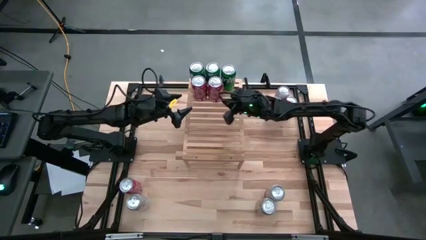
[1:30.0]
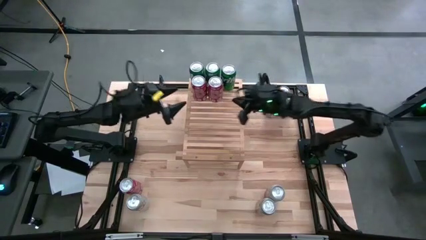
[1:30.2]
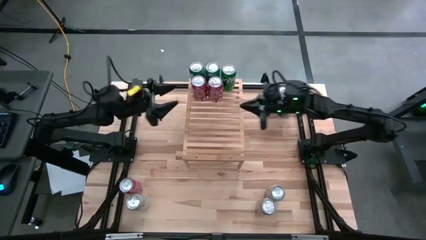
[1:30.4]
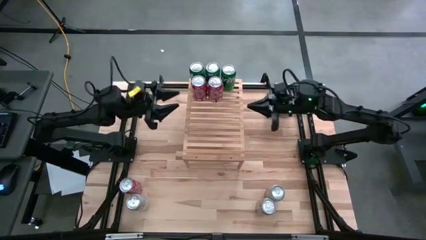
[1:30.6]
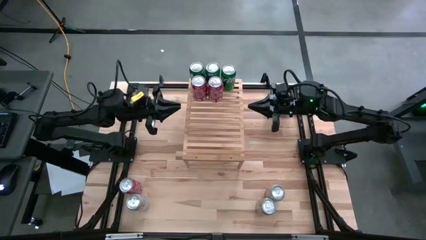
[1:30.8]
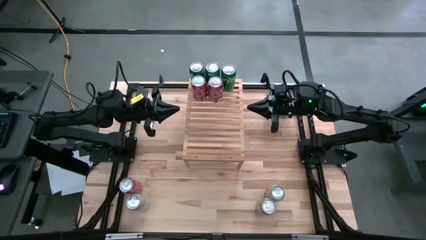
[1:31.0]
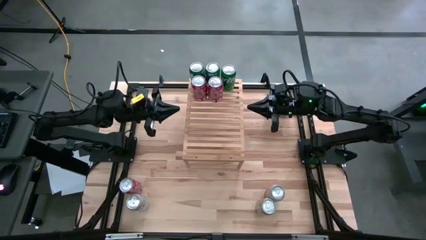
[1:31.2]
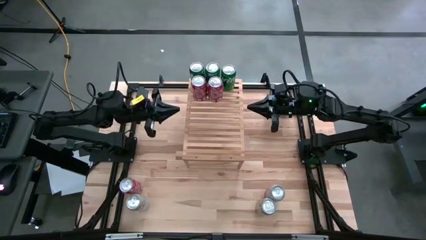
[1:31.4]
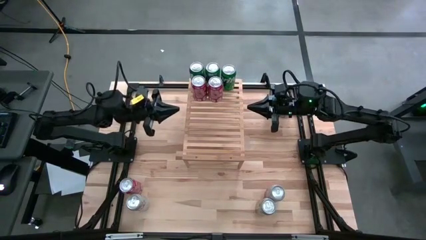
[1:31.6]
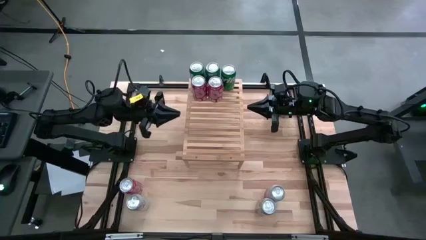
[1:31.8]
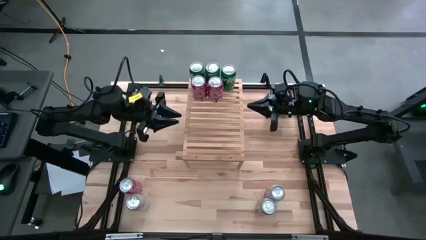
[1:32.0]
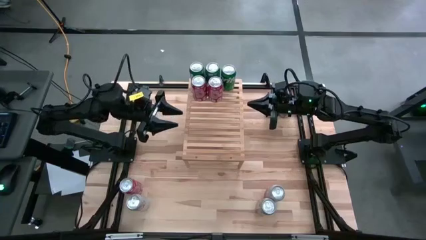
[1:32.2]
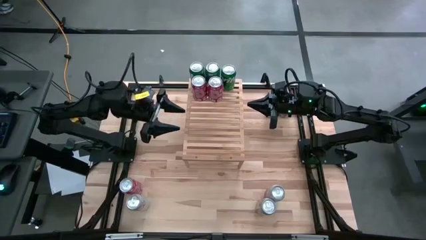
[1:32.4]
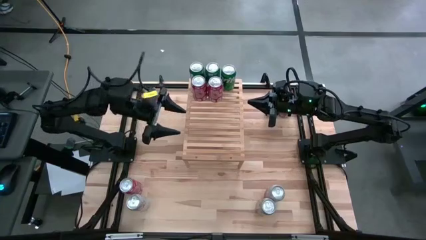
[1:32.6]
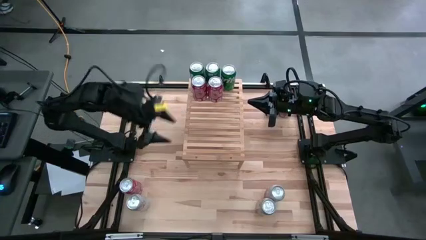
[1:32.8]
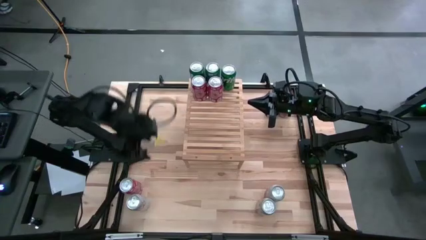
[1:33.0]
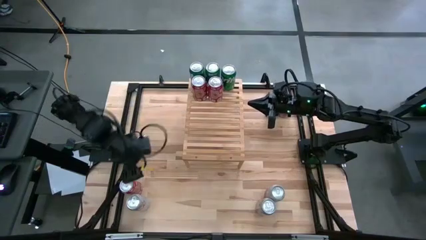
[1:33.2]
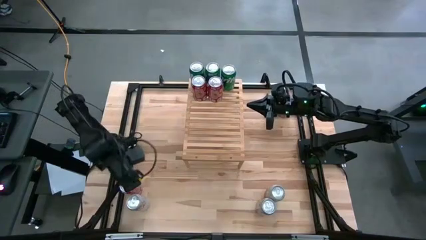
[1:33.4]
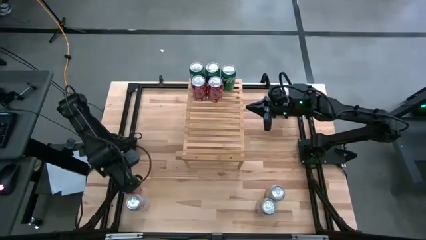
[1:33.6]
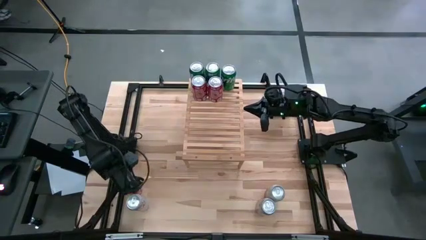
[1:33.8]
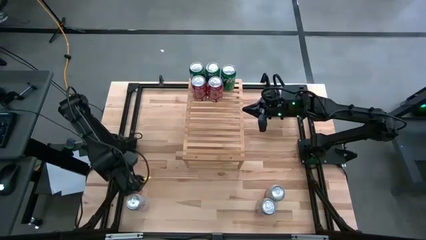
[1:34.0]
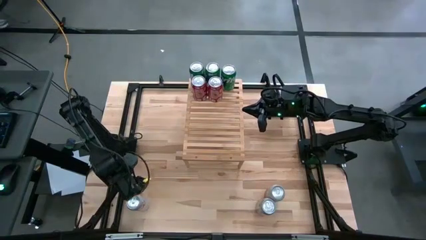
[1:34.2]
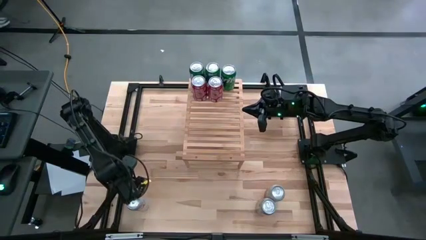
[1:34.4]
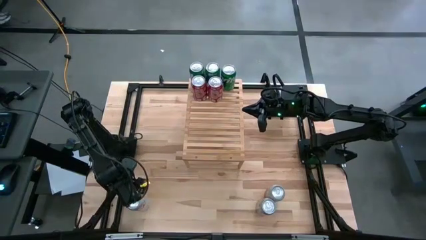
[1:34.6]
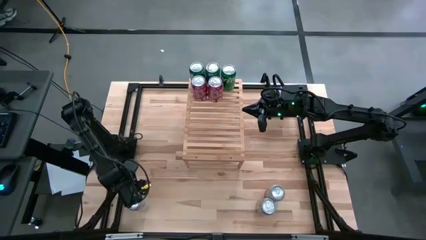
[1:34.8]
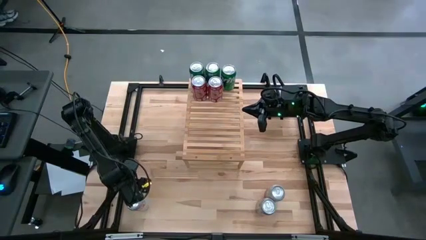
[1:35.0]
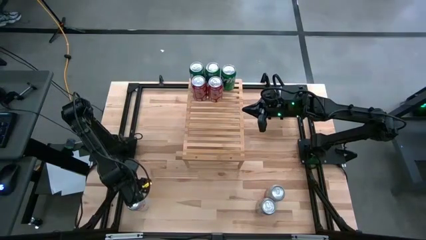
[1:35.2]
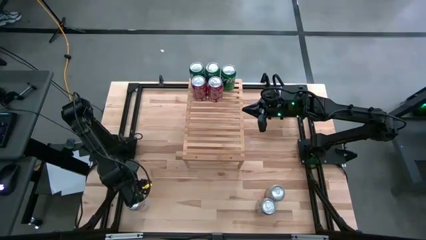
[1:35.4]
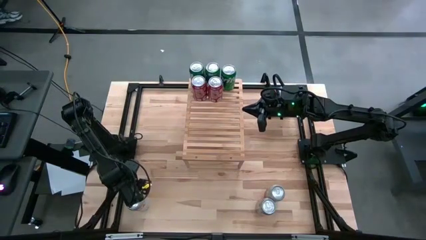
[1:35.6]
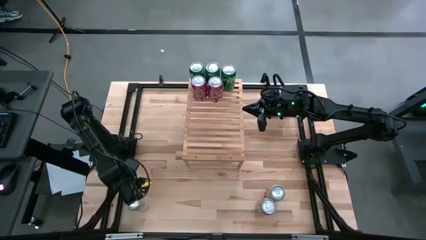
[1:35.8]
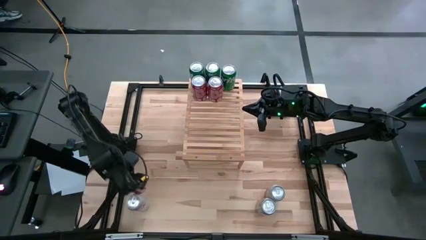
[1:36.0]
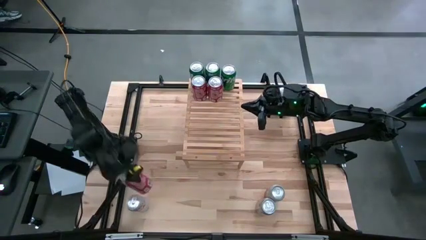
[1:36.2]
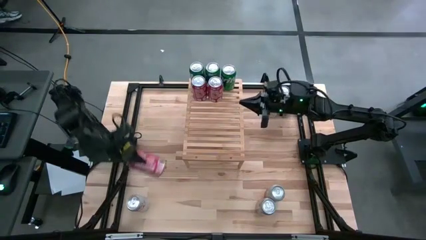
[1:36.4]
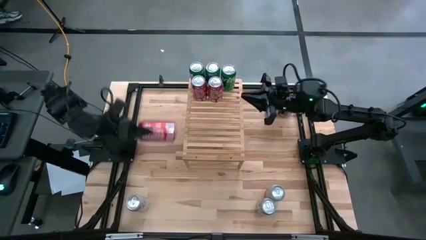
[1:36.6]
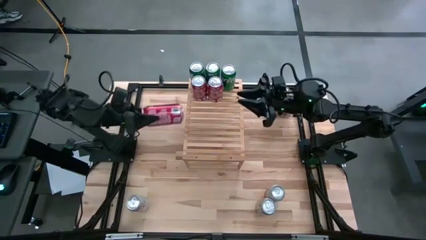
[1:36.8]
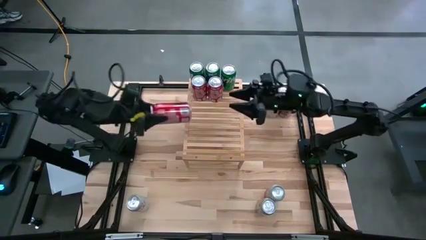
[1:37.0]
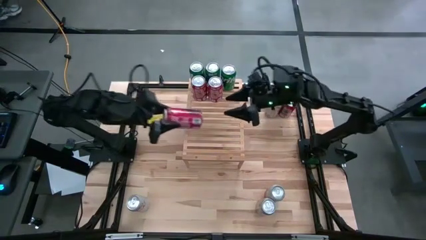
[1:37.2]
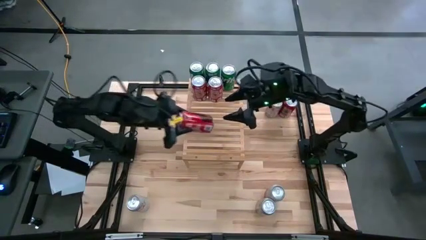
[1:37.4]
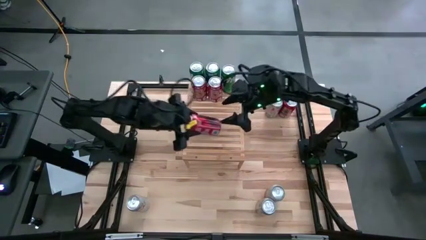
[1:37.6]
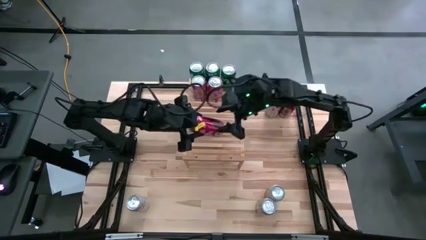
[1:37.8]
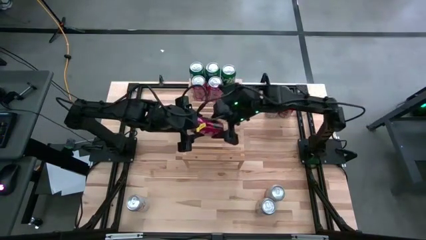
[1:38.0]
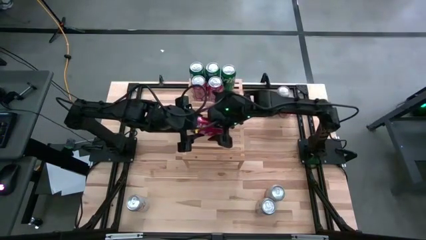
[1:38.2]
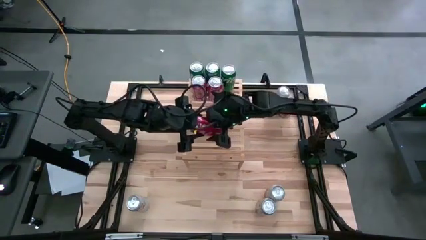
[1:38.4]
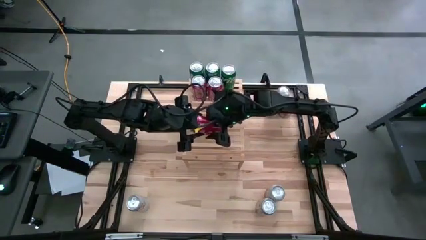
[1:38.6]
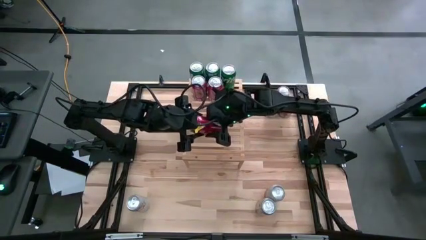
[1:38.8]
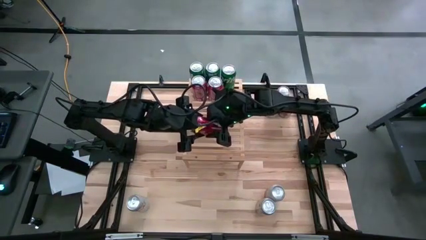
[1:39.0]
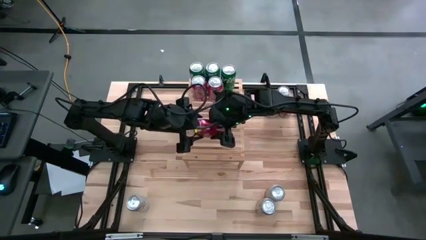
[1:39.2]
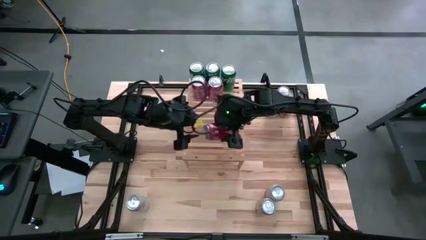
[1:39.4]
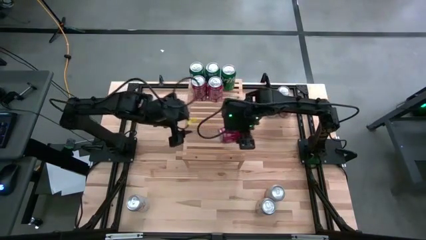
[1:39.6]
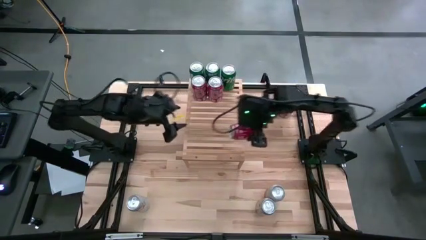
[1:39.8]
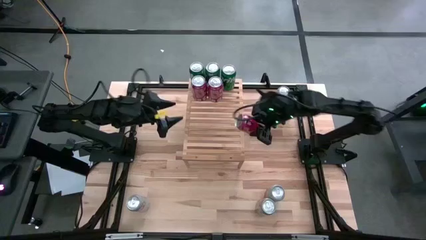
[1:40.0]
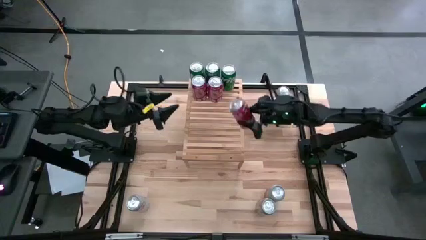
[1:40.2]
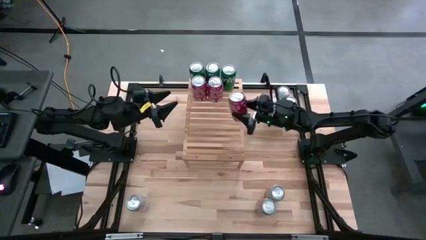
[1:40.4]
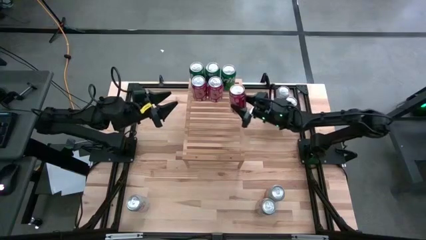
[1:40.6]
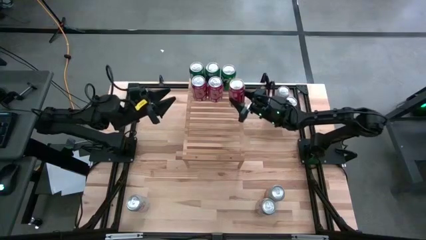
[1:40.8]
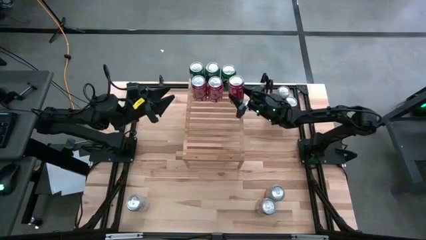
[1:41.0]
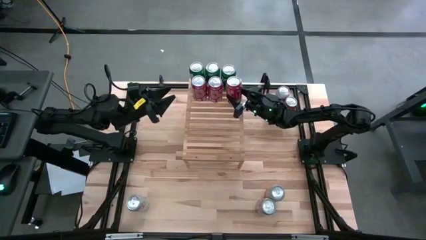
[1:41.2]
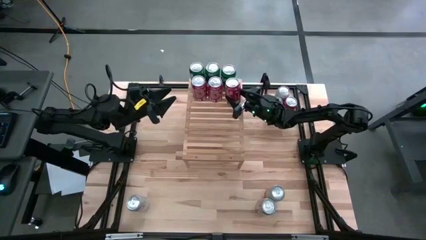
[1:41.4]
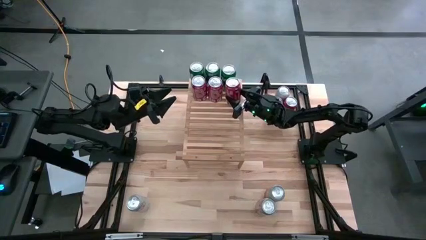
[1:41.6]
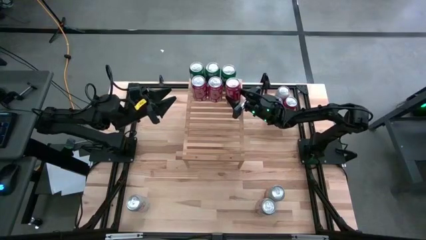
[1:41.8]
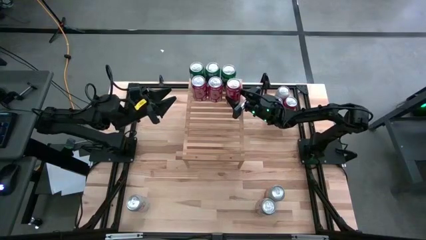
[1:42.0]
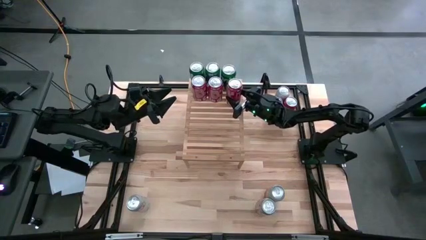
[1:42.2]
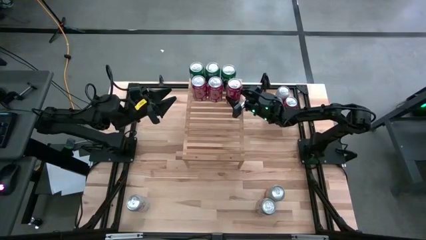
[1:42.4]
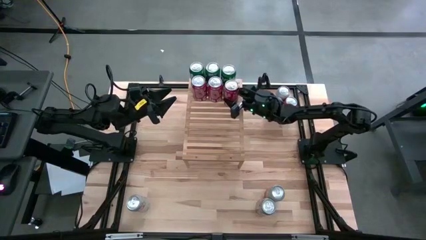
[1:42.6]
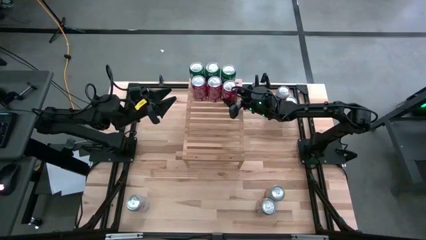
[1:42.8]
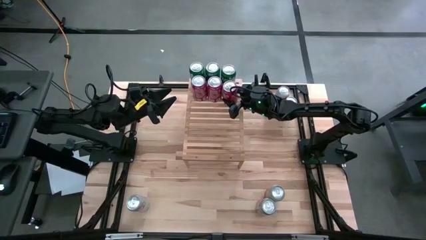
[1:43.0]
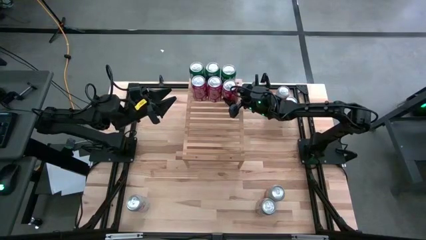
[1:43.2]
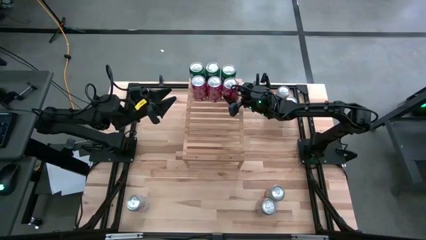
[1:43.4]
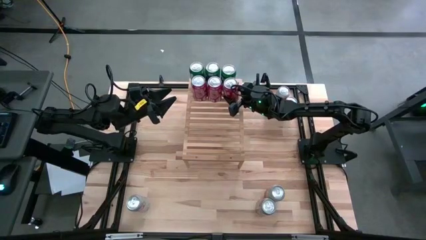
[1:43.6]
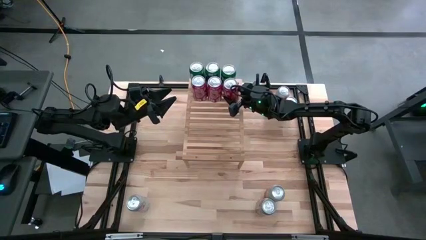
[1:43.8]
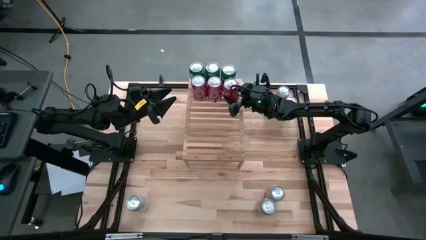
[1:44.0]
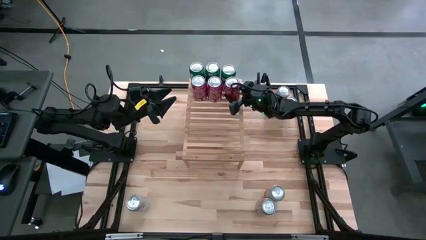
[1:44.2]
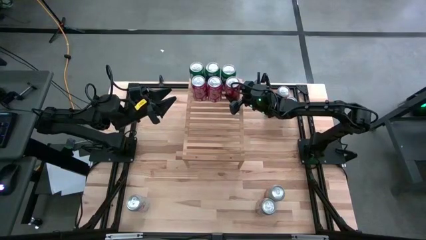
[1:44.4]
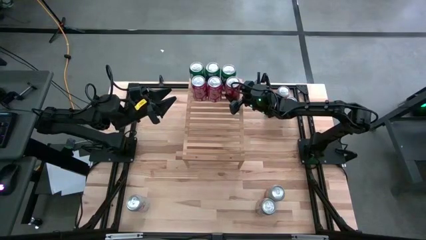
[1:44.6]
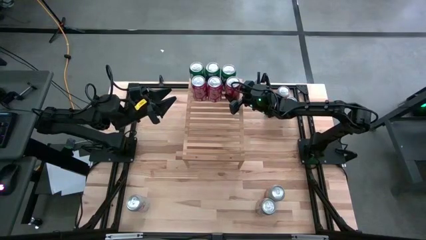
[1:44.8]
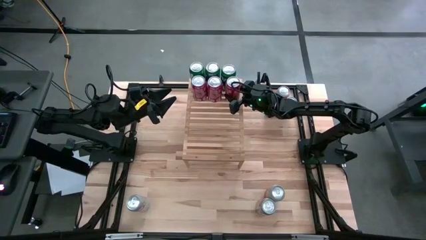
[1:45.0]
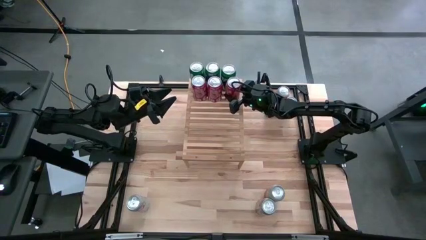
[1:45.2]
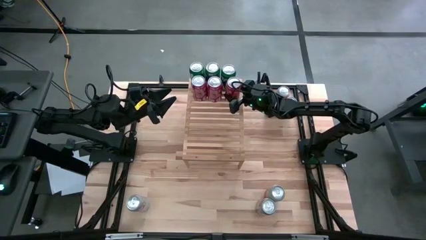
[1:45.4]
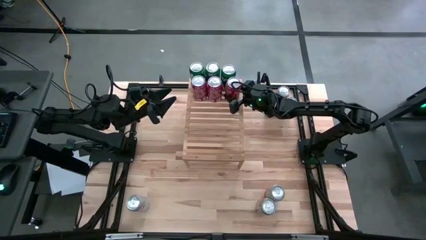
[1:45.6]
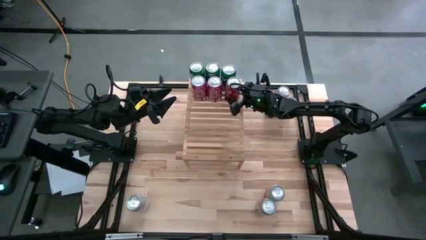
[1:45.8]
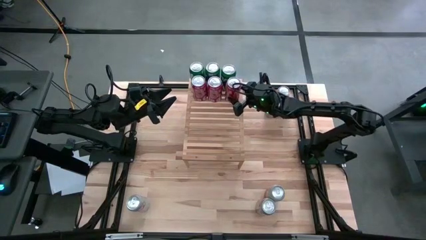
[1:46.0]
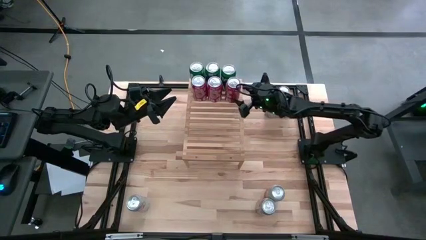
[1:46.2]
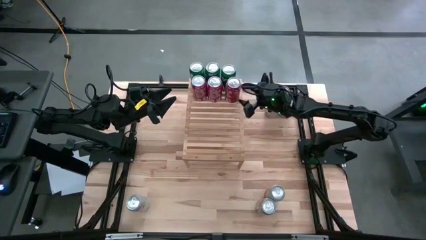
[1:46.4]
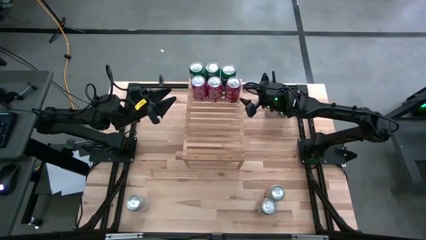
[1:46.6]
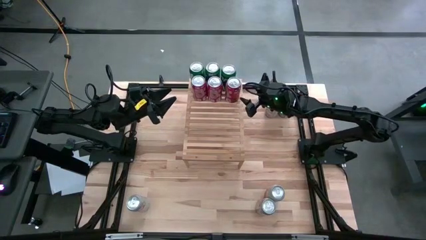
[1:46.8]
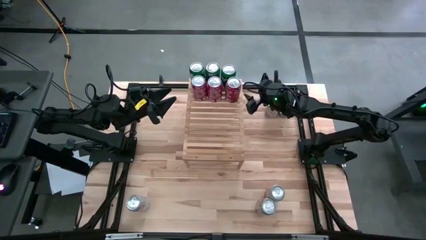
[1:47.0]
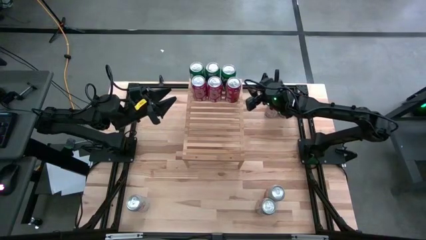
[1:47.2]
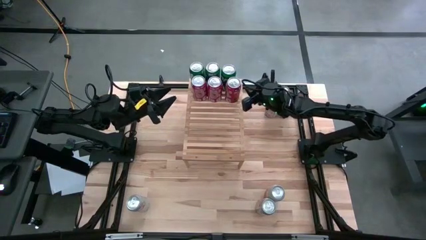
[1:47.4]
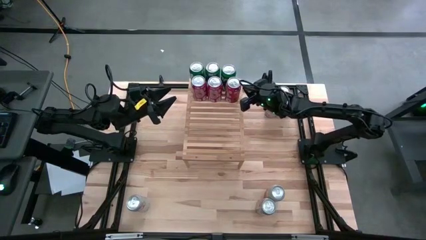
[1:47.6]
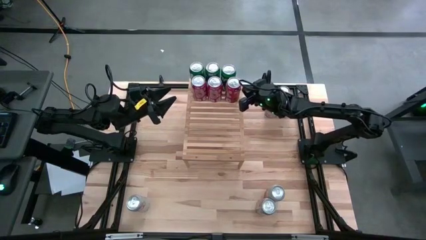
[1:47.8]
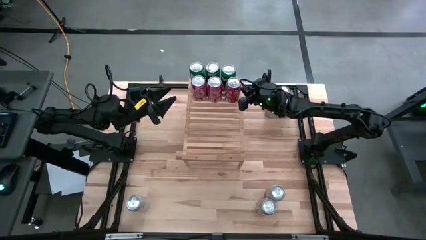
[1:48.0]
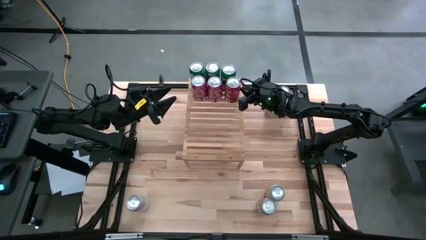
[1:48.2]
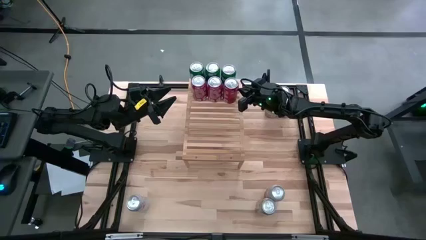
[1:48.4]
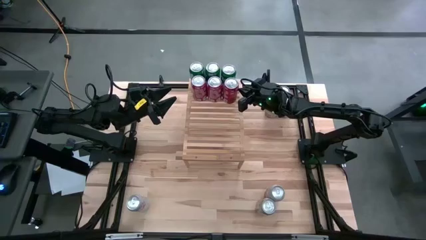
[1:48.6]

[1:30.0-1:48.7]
Task: Place canned beverage on shelf
Put the bottom red soda can on the shelf aligned with the other red soda cans
